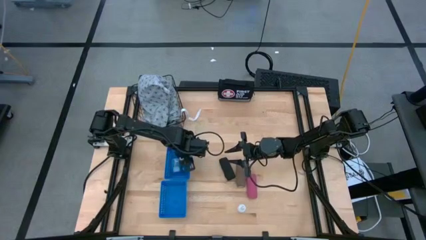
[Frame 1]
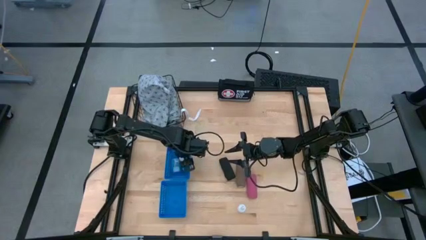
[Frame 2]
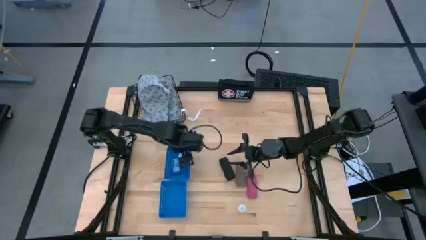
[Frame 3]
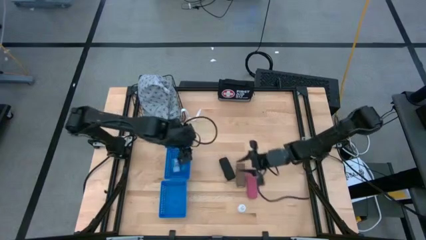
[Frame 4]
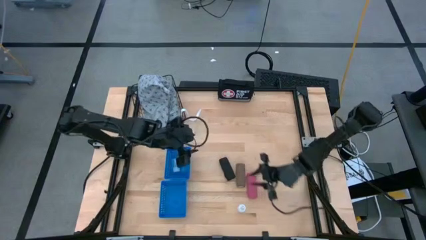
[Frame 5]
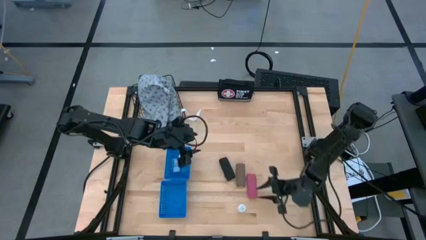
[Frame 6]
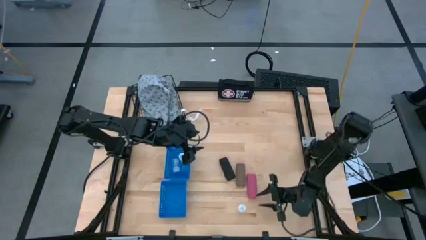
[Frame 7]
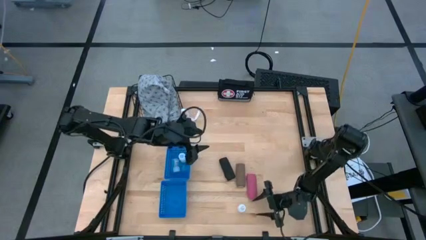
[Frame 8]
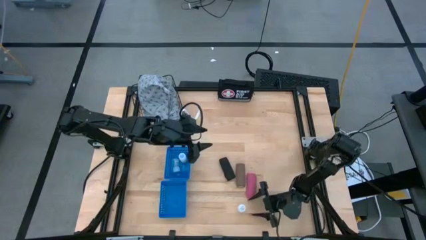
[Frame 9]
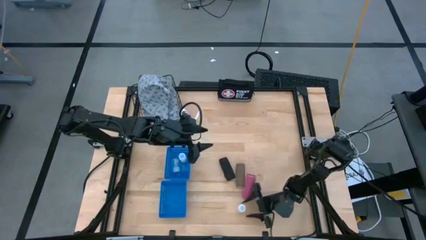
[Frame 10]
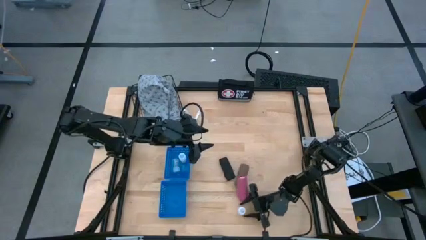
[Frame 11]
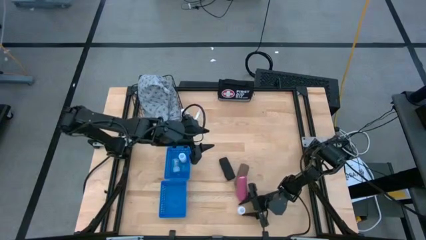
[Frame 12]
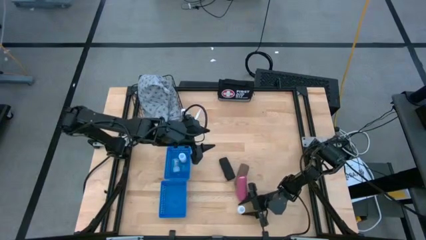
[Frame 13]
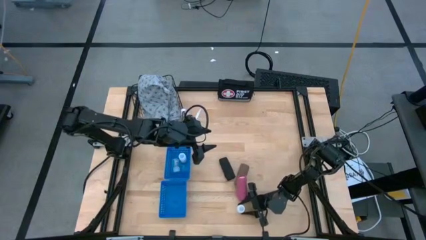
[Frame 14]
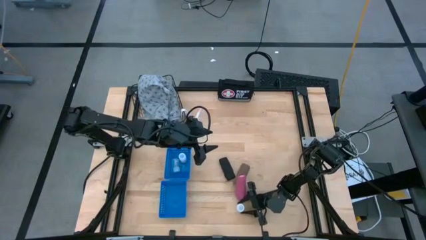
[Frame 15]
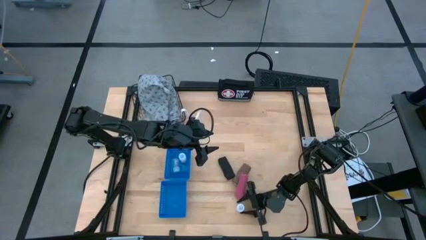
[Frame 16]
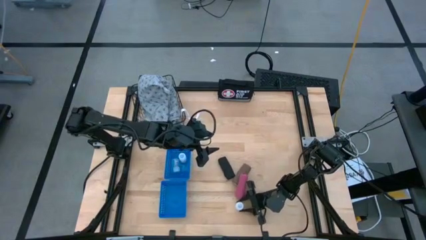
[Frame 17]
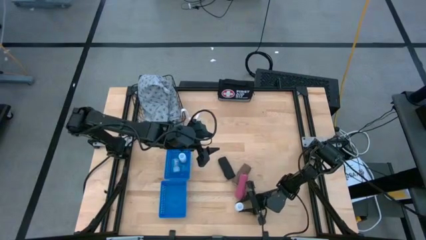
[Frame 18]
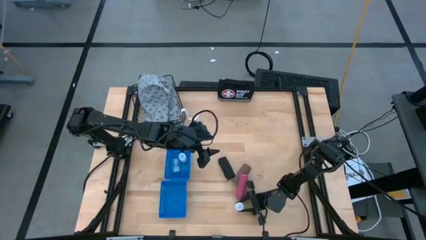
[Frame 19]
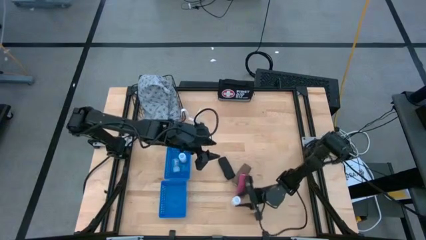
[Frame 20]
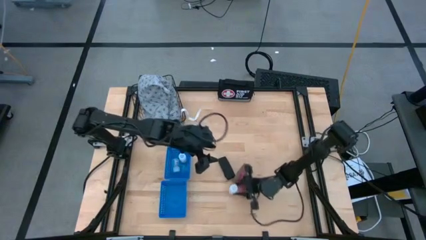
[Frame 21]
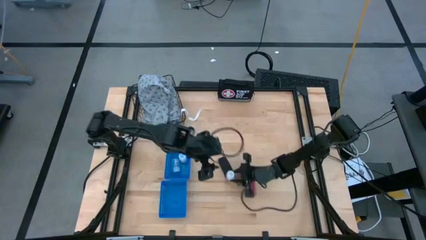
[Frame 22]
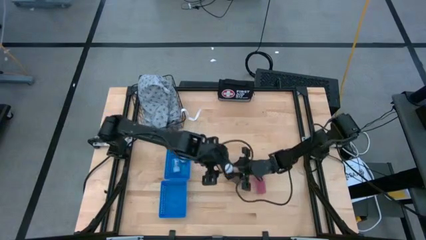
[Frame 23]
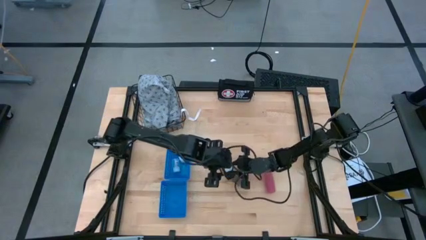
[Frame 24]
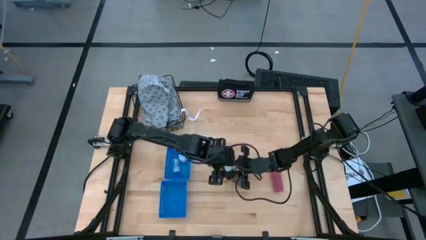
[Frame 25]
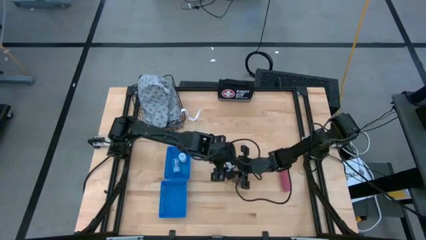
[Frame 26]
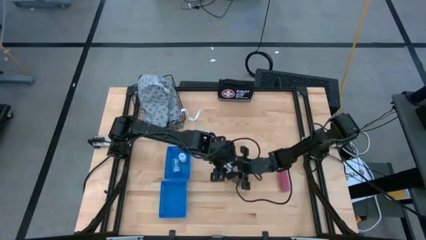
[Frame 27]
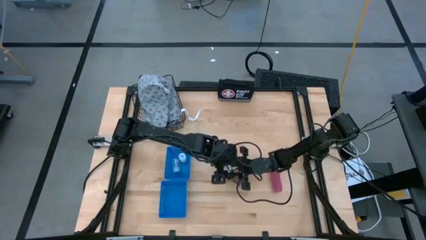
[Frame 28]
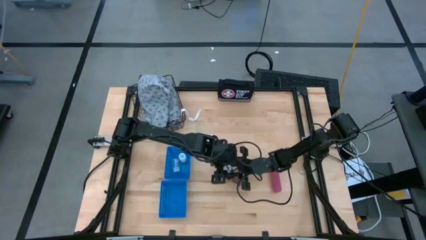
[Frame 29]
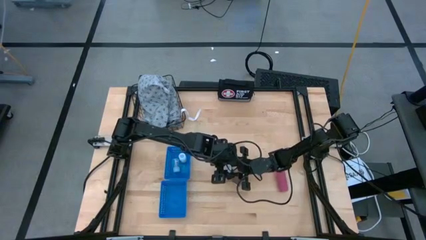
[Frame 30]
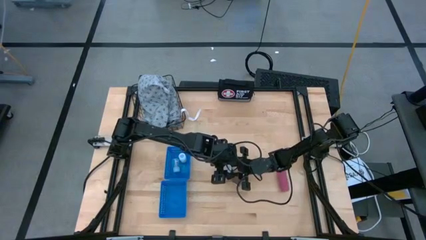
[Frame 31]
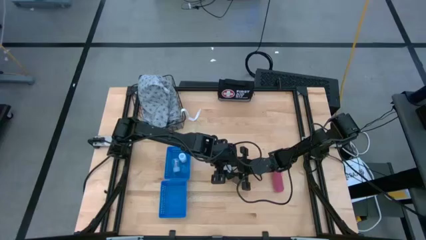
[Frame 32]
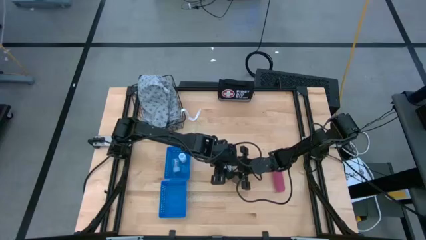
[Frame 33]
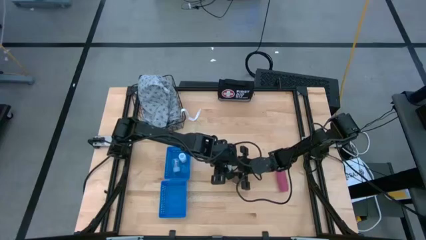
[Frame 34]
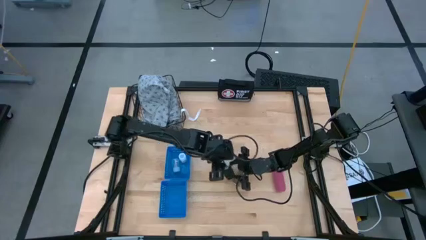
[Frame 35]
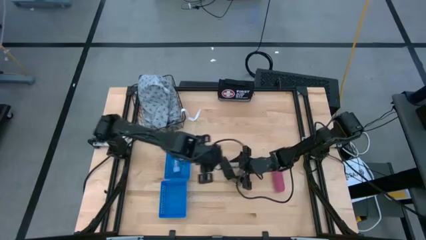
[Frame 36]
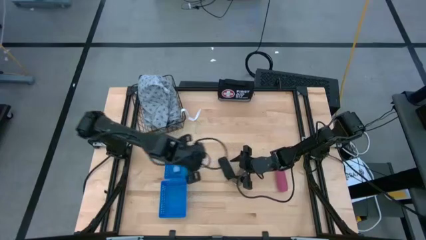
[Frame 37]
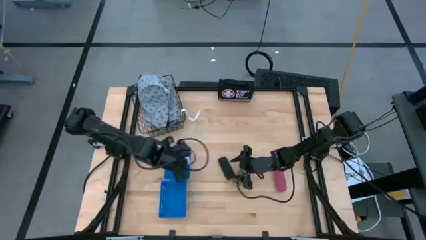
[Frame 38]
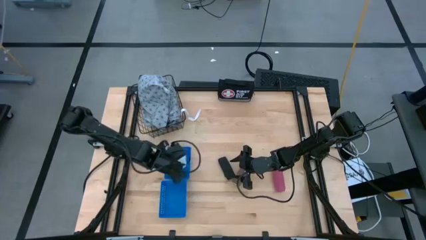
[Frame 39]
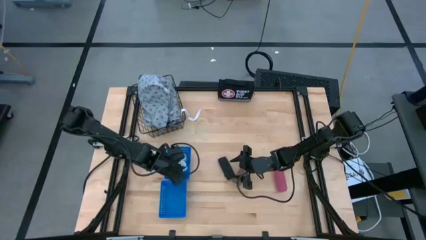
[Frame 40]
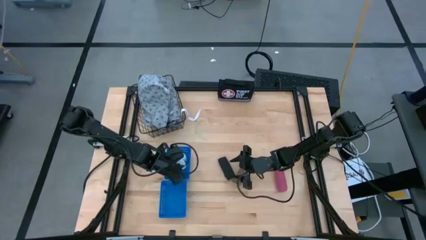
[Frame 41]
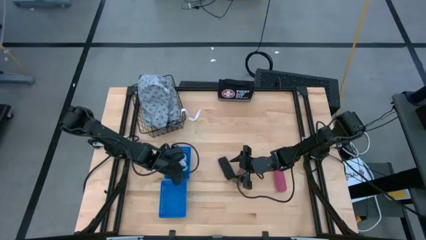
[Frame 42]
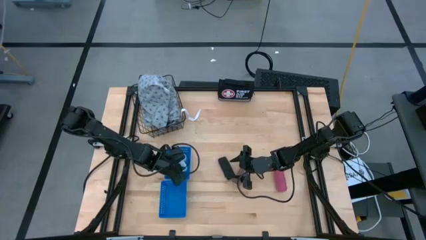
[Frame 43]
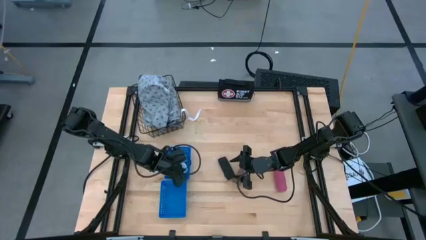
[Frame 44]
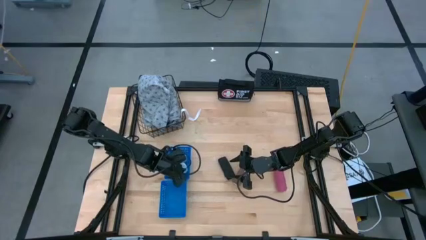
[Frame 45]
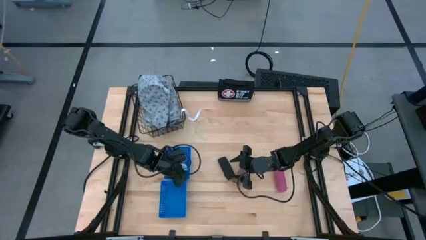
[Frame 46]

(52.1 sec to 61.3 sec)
Task: Pick & Place Medicine items
Put the white pill bottle into the top blue basket

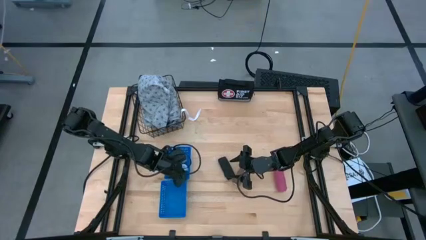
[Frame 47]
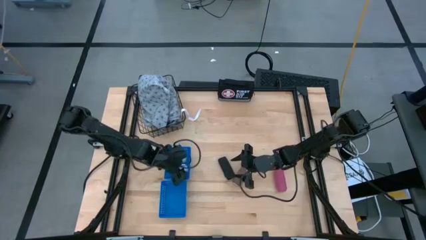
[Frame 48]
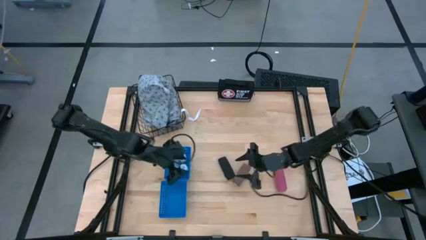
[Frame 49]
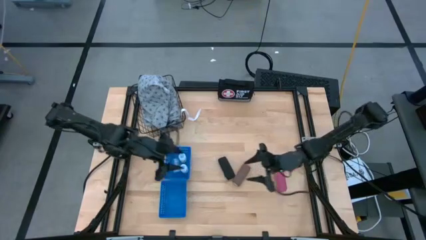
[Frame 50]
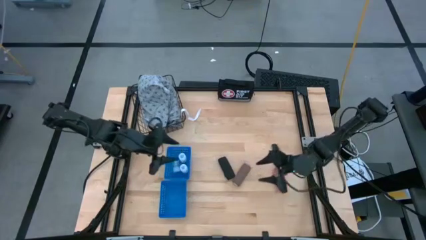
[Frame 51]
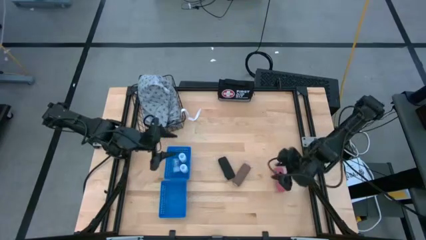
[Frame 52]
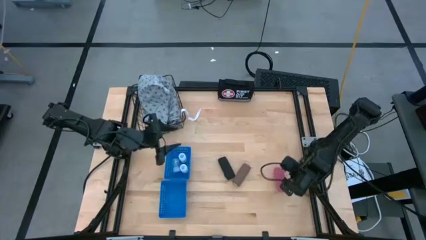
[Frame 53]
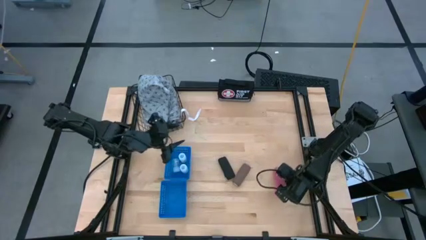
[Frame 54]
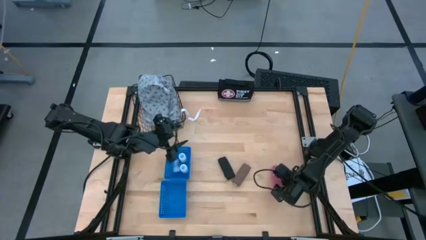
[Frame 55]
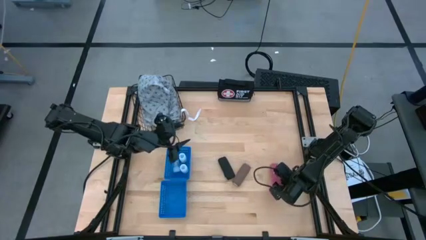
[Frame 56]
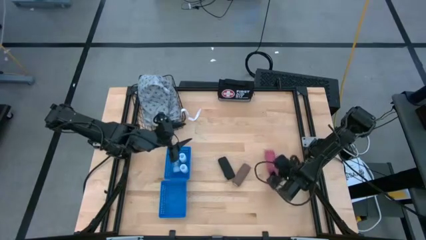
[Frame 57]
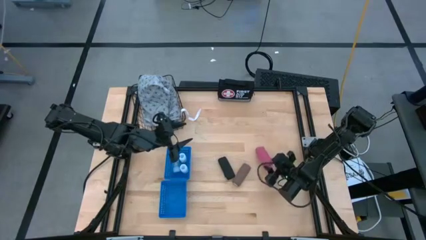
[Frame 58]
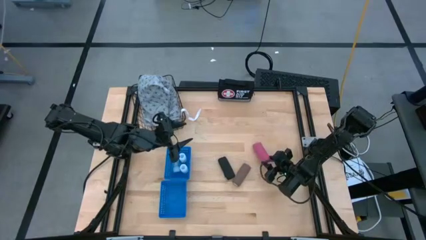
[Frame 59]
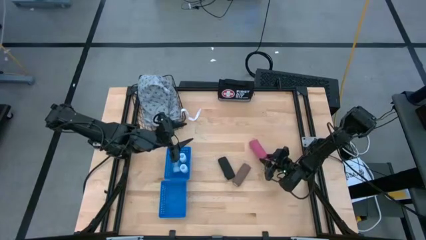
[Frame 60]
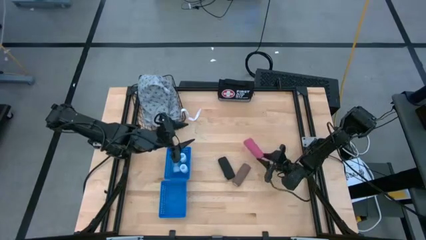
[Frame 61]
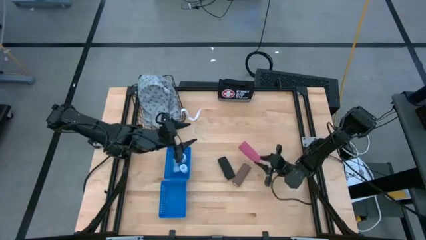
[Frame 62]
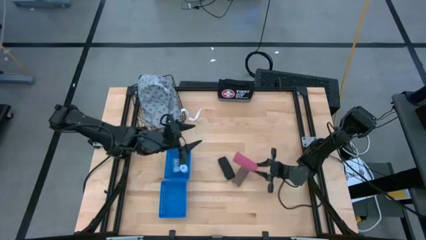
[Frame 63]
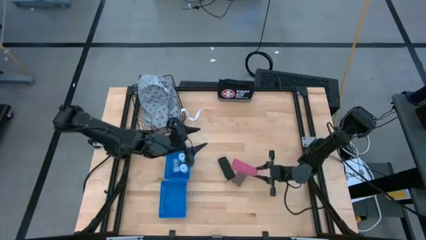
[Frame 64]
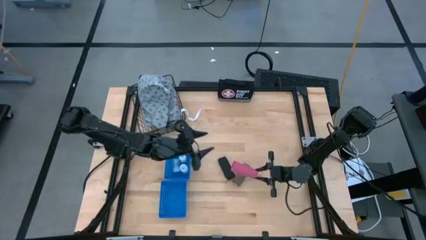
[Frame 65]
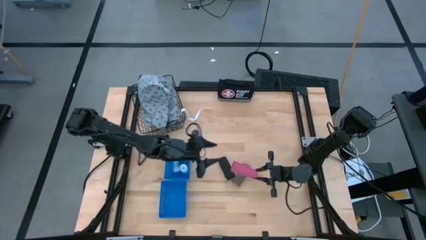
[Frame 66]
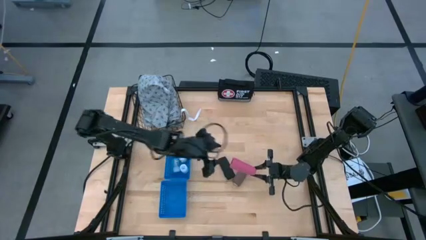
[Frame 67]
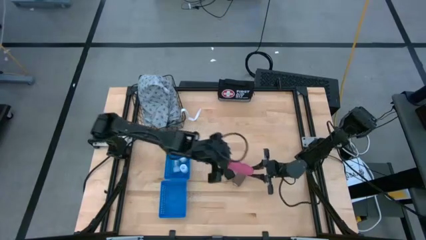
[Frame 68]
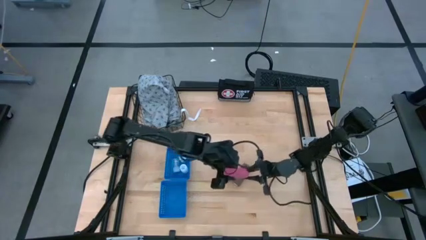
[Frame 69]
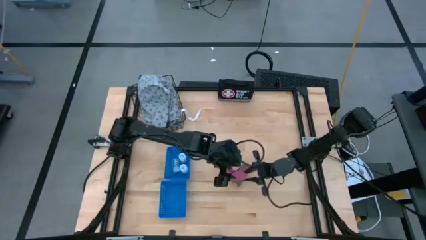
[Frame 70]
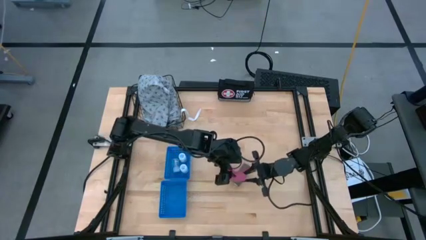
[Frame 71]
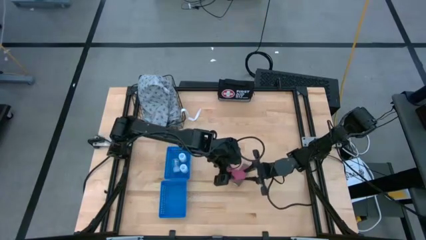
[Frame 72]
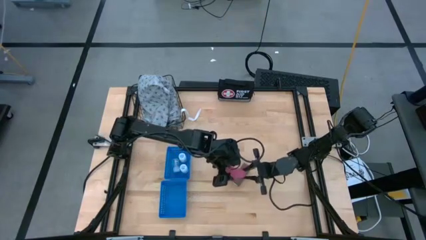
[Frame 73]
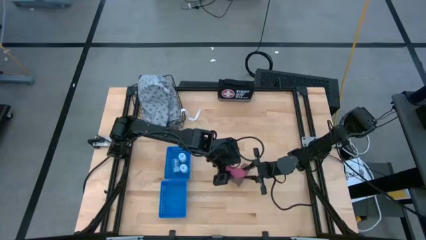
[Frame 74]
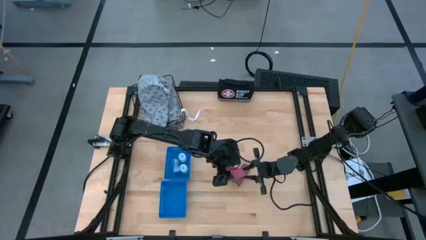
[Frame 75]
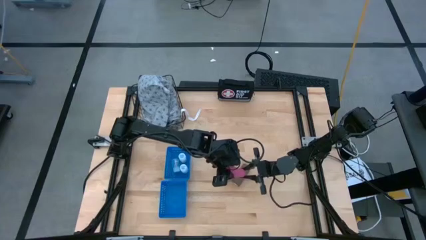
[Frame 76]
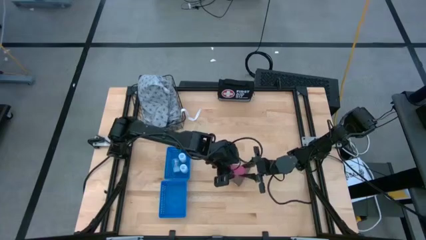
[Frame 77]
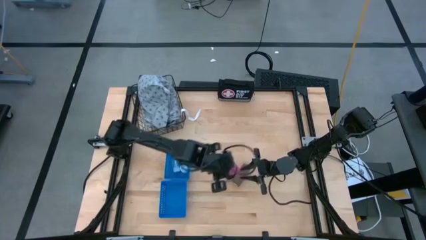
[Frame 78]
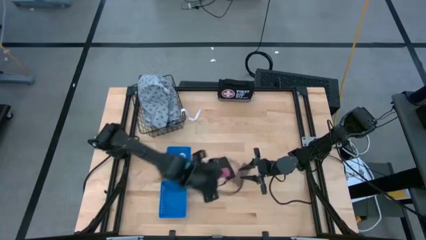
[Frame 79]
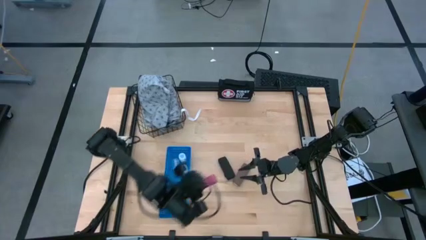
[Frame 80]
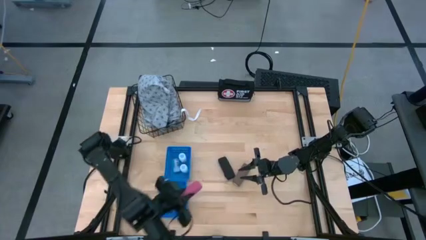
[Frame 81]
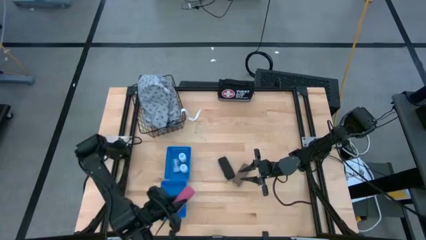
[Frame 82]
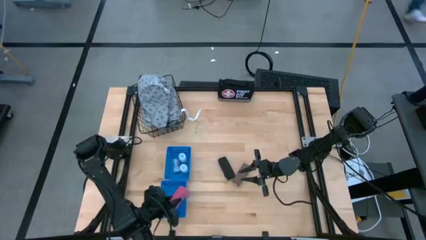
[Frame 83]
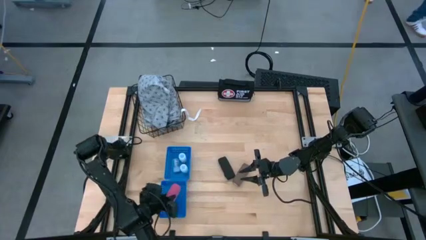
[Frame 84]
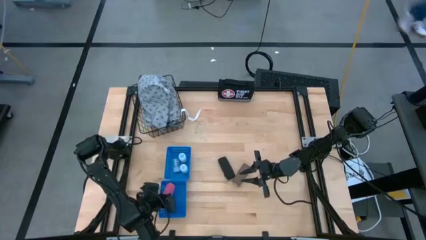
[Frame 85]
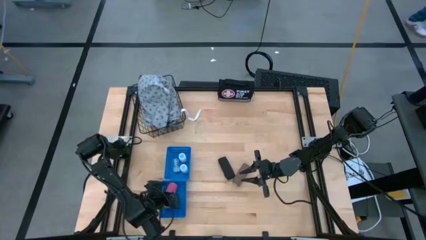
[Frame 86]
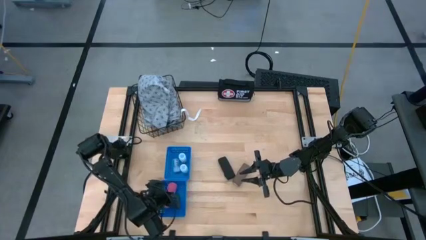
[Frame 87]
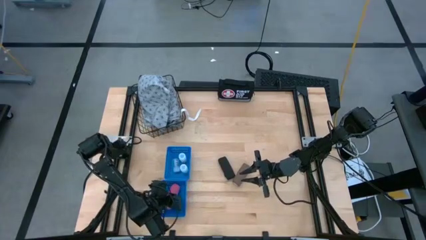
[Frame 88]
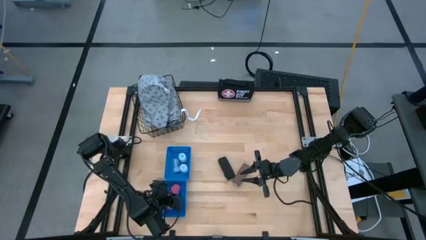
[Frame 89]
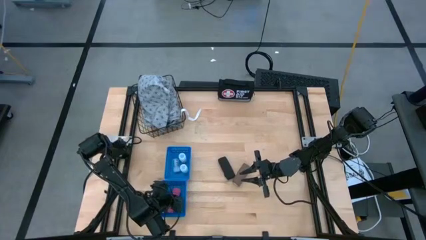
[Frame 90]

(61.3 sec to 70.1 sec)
Put the pink bandage into the bottom blue basket
